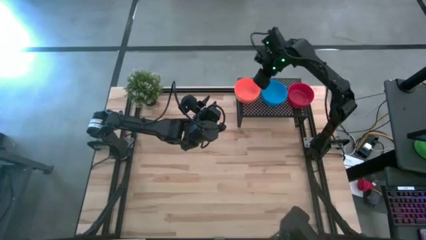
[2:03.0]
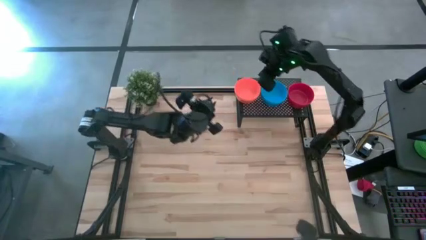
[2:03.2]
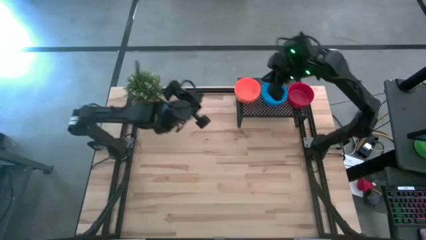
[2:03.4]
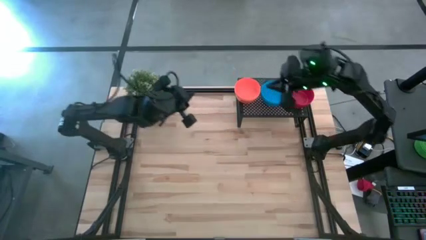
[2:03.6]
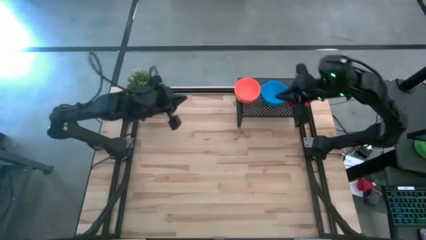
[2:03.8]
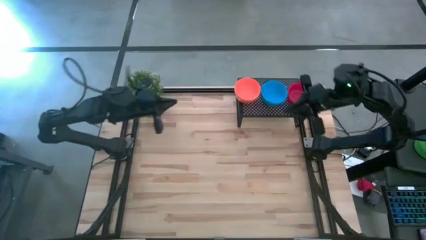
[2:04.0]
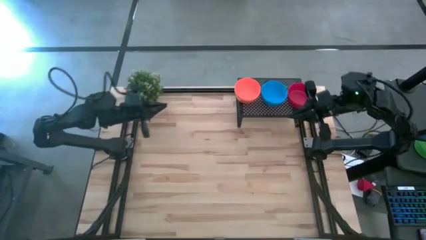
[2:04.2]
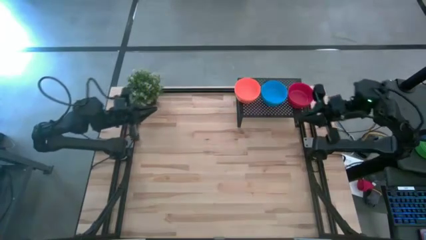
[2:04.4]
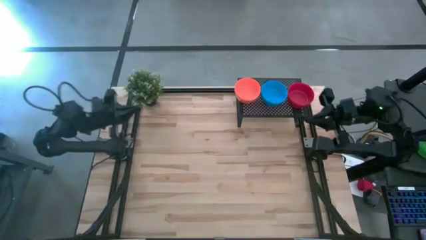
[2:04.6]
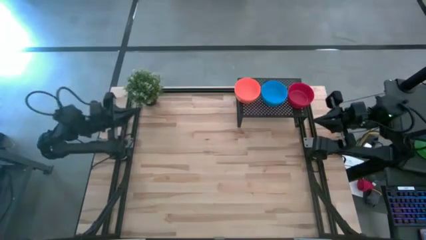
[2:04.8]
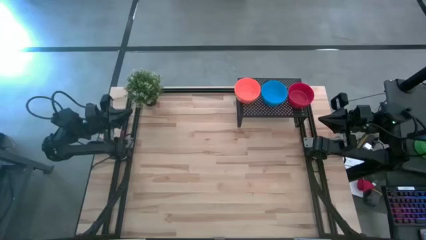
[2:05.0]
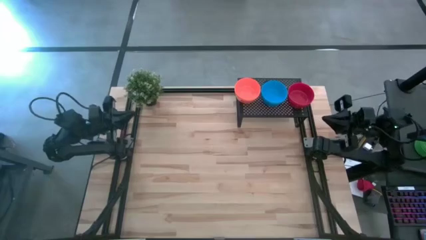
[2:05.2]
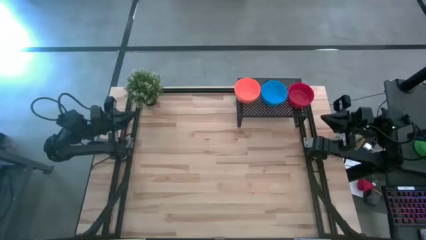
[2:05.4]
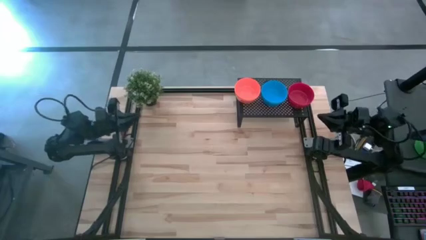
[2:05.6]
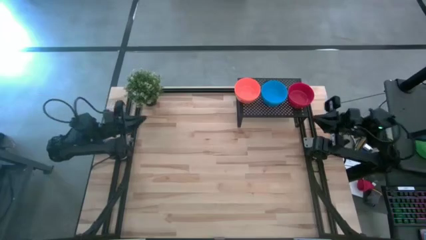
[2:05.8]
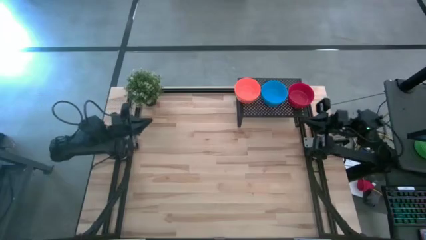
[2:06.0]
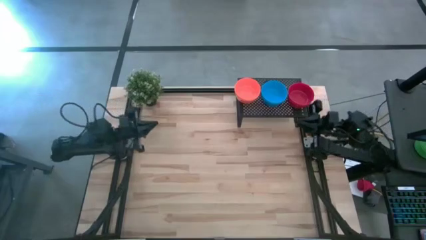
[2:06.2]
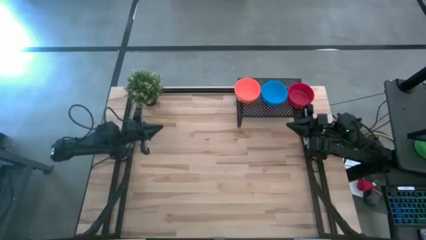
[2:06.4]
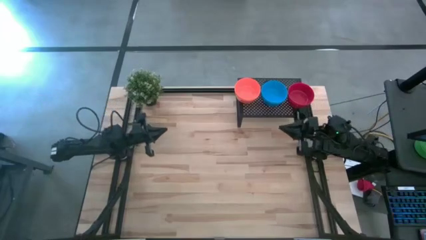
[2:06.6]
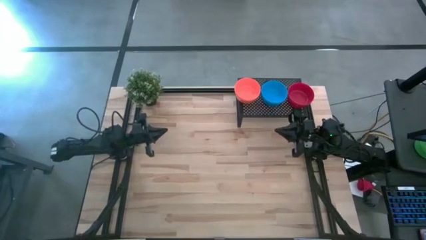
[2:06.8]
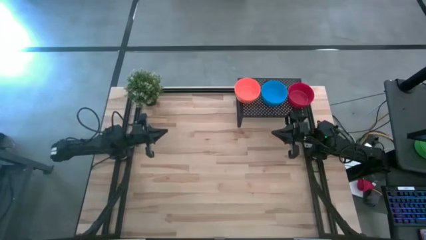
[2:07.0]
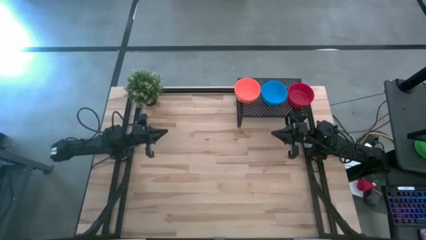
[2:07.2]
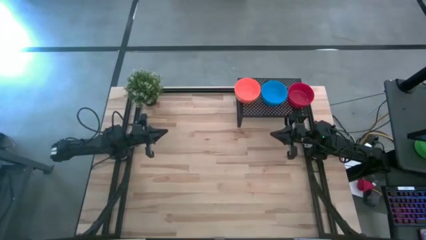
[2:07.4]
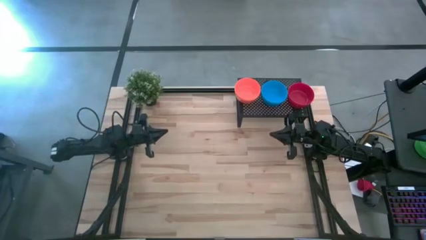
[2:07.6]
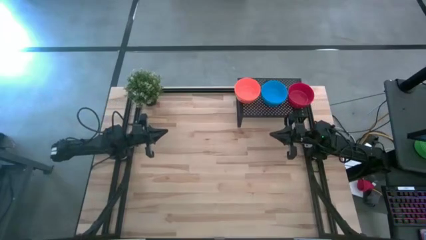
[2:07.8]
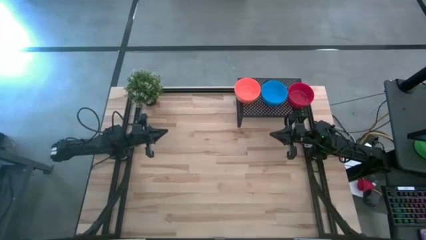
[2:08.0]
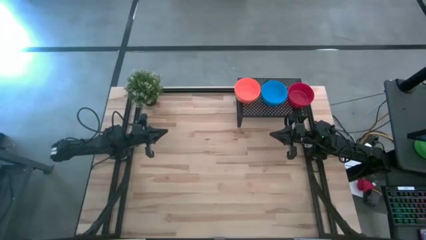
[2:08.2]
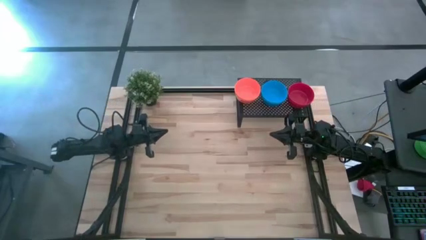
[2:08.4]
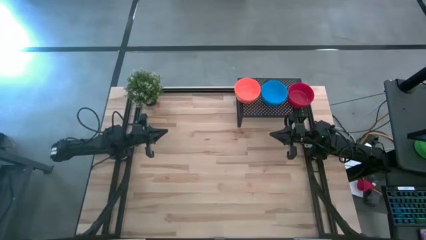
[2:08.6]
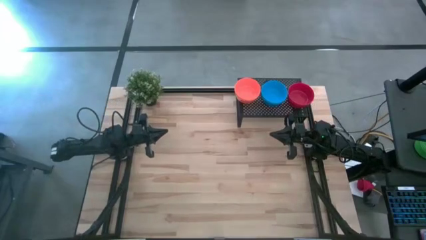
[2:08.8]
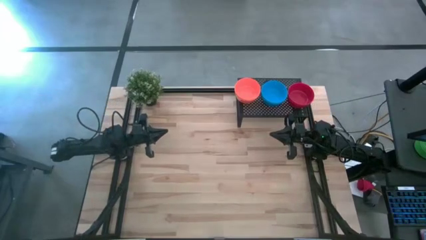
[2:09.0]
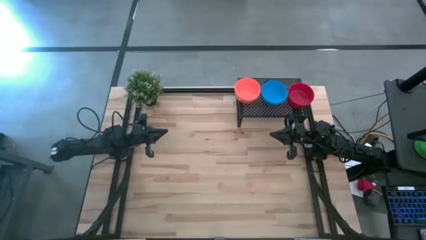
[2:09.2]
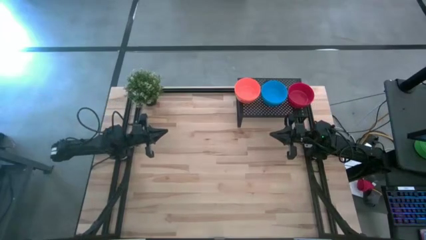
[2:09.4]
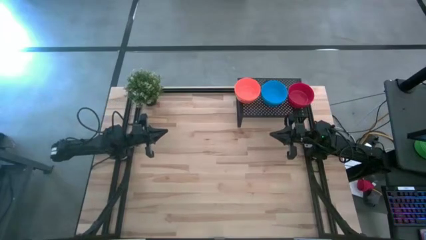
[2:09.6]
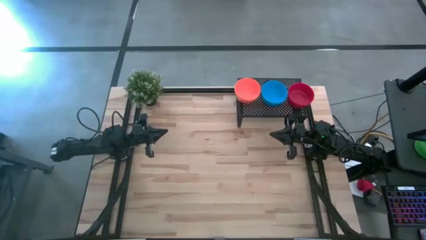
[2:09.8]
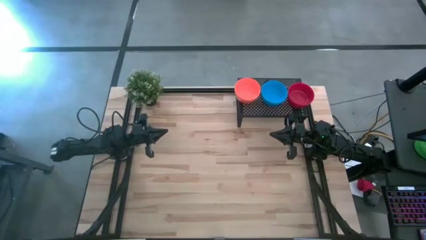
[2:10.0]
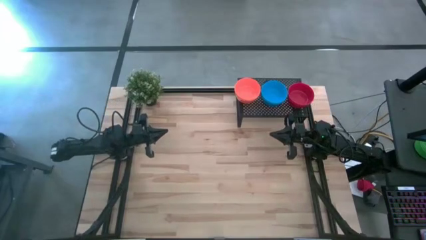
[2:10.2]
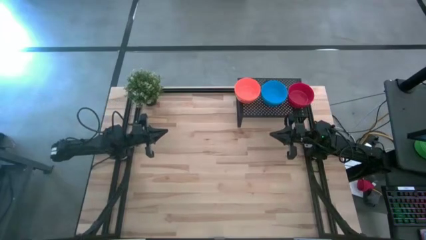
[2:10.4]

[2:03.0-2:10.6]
Task: Pick & Place Mini bowls
Return to Home Position

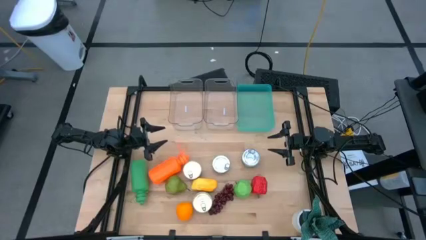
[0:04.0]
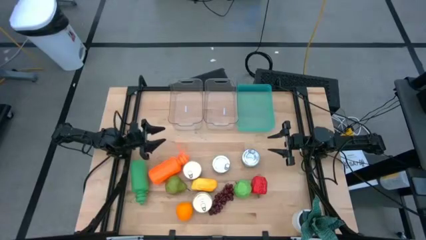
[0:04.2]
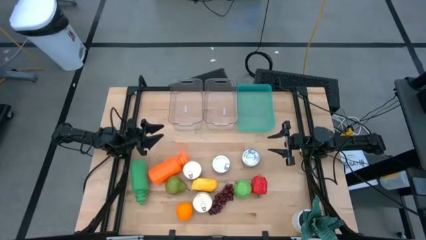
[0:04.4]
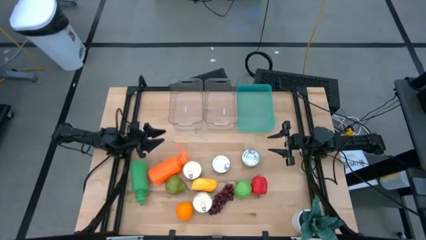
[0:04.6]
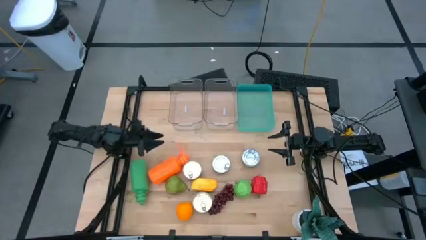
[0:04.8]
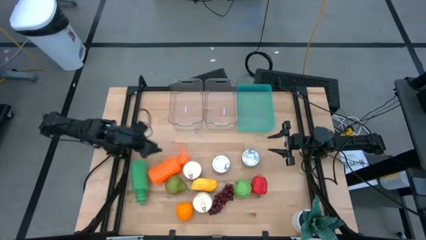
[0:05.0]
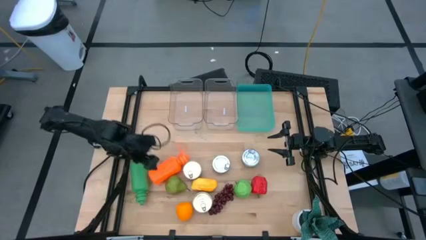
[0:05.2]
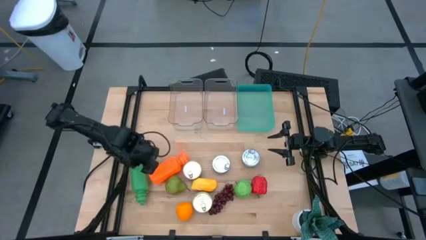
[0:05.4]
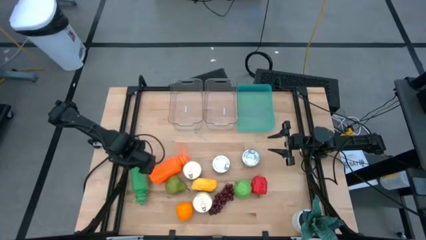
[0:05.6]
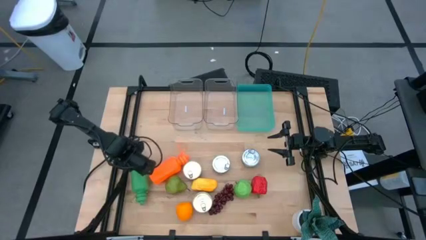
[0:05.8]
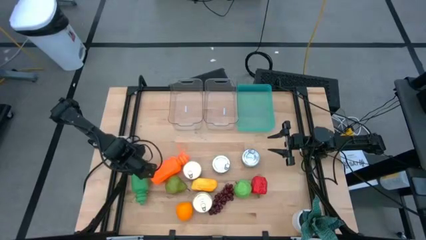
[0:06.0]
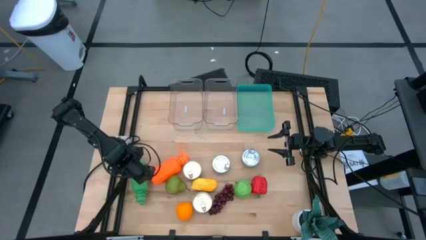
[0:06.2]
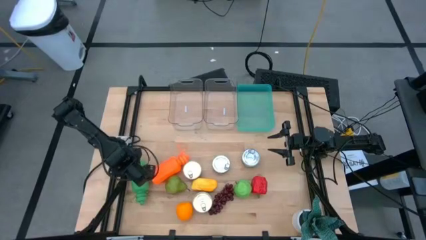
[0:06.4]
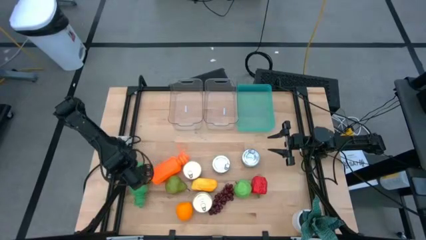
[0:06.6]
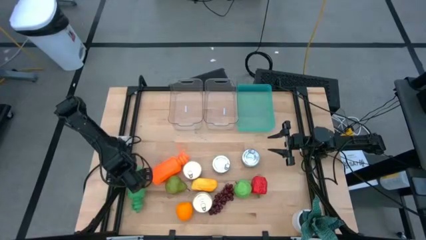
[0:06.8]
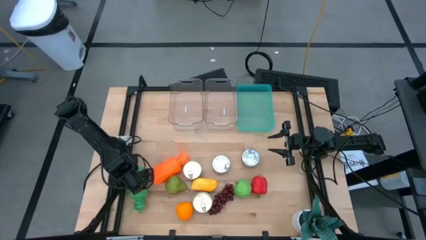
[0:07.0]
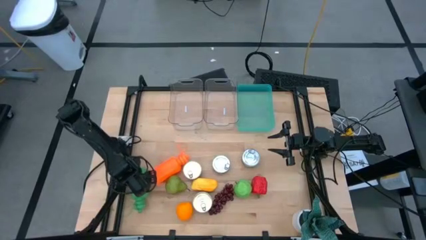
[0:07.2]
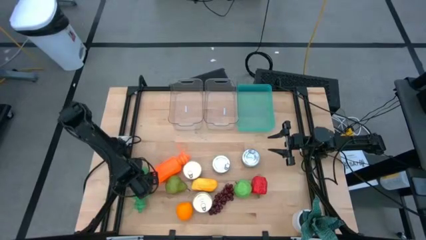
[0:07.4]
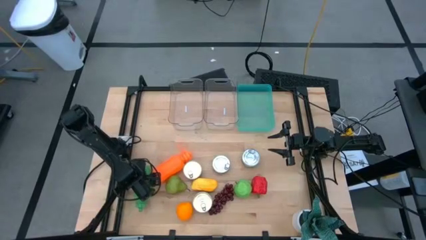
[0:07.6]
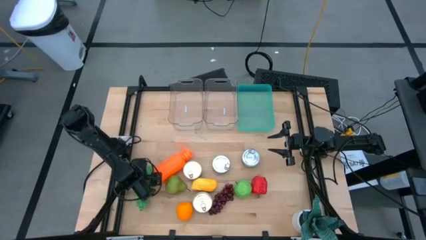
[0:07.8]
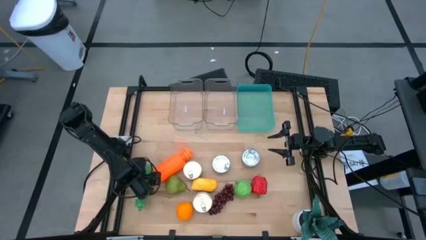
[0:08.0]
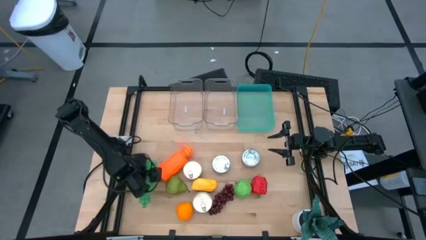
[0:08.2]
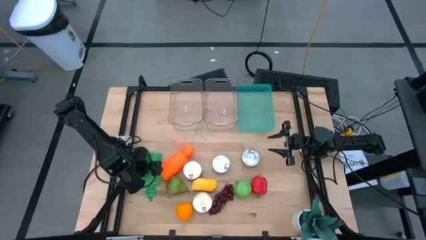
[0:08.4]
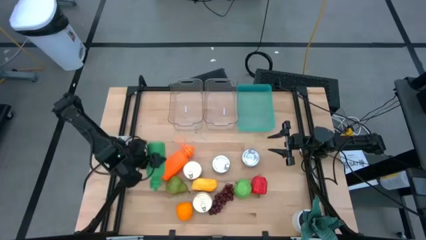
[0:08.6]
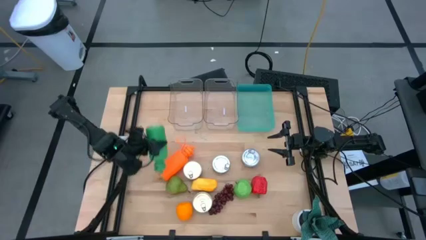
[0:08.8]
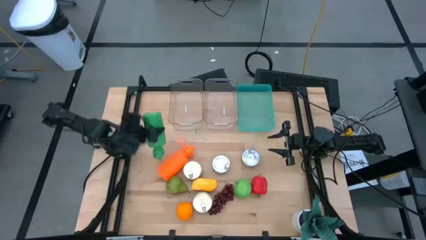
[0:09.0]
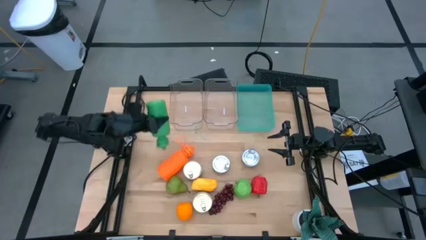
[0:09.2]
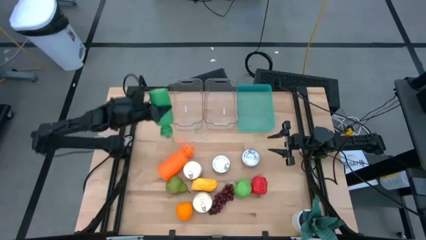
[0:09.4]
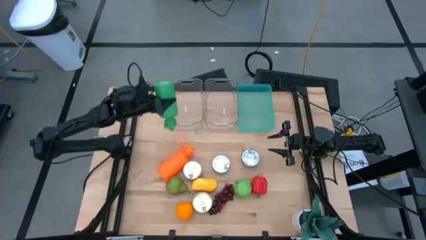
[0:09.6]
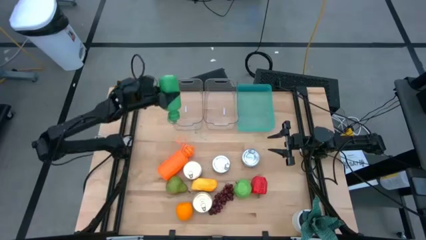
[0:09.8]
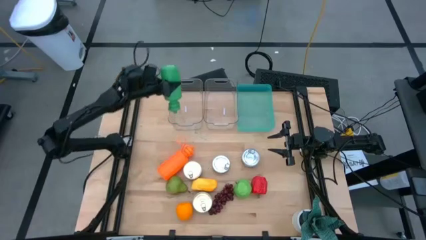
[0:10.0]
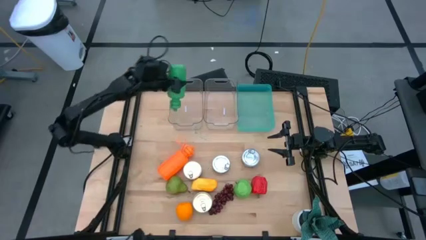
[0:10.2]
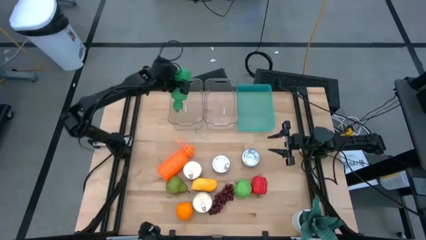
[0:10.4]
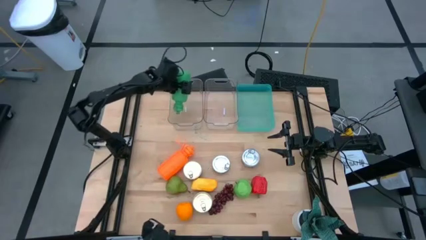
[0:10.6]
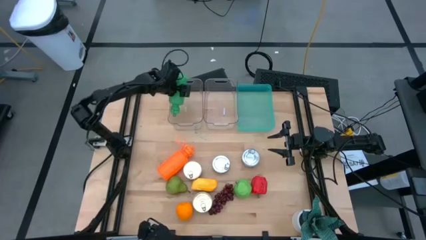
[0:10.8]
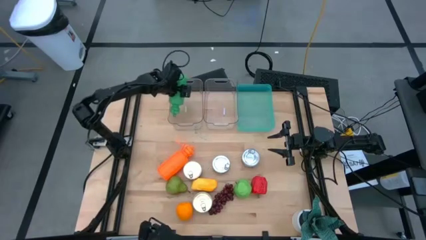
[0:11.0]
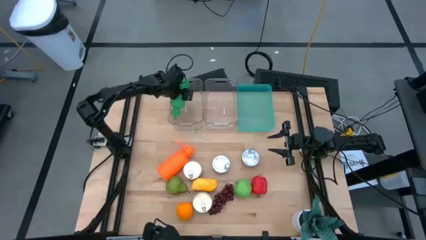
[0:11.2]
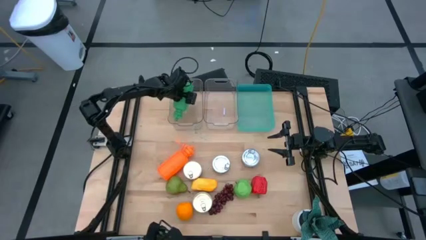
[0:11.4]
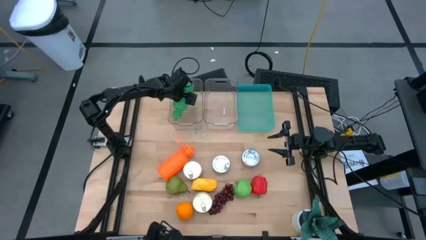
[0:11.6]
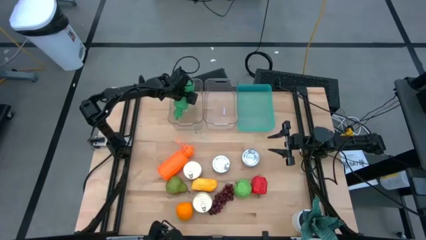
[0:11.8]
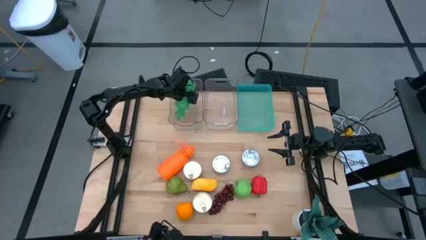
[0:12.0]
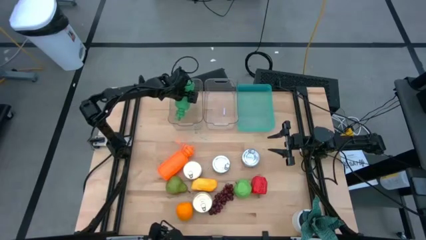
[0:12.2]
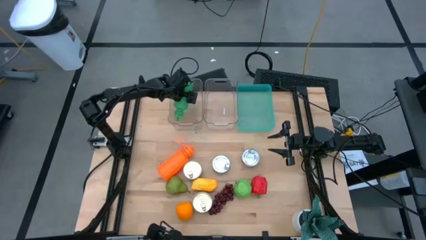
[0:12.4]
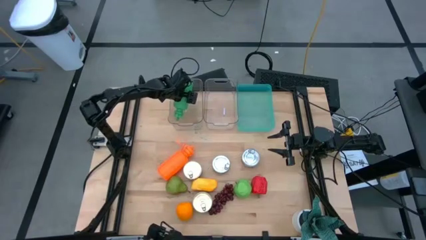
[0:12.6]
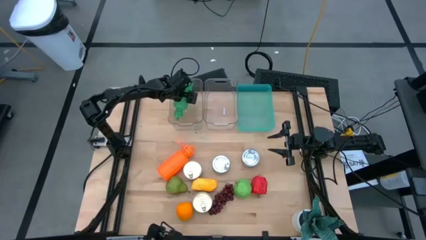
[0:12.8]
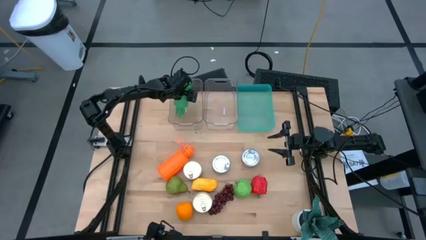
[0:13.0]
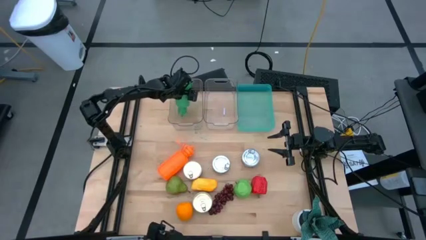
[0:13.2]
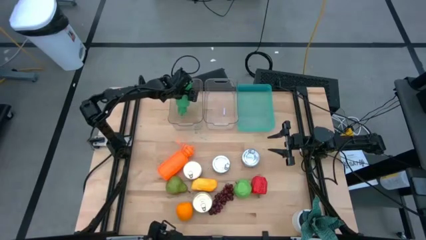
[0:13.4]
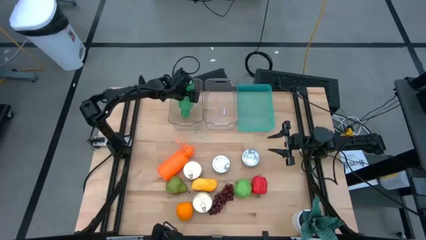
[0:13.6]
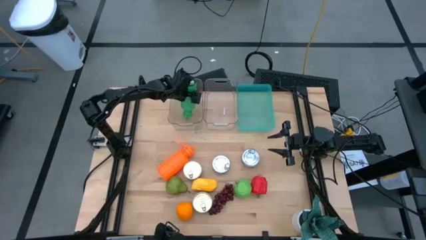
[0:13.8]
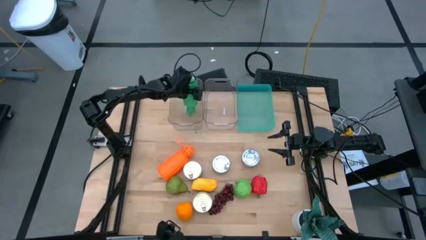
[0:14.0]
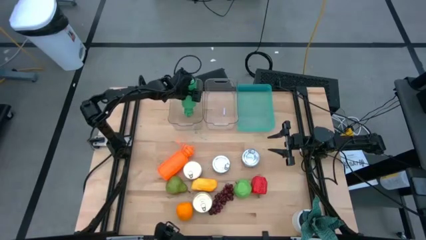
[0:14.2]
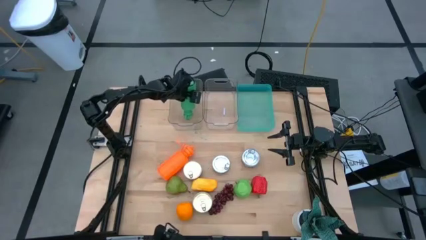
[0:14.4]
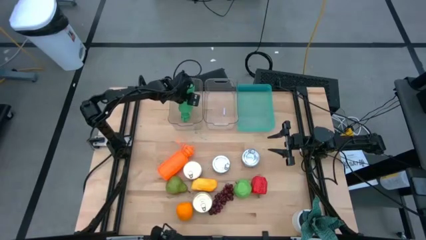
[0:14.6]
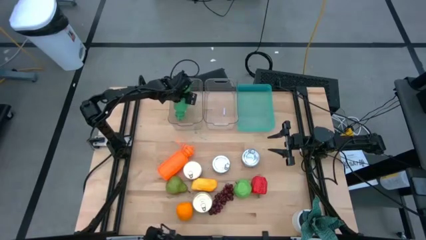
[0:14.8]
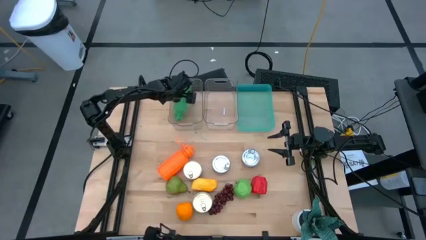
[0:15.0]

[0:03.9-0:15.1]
Task: Pick & Place Food Item
Put the green water bottle into the left transparent bin
